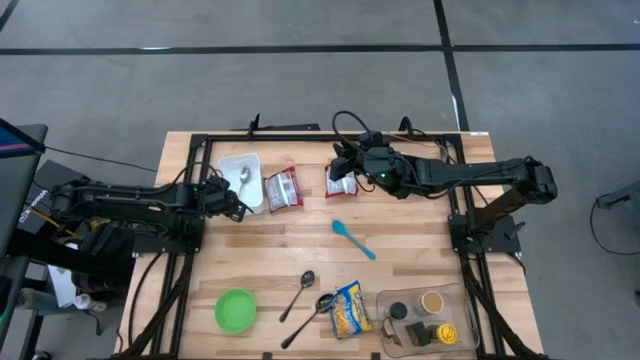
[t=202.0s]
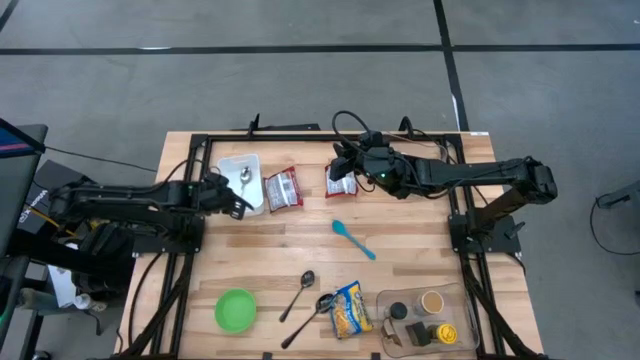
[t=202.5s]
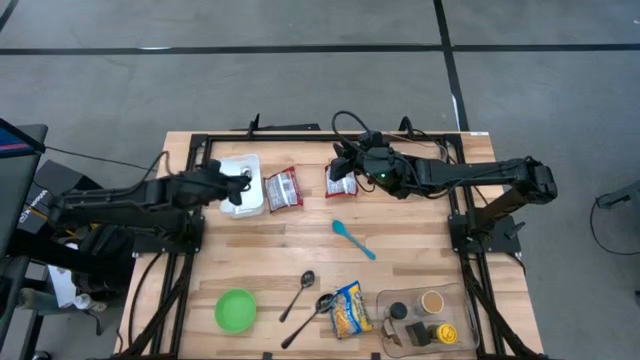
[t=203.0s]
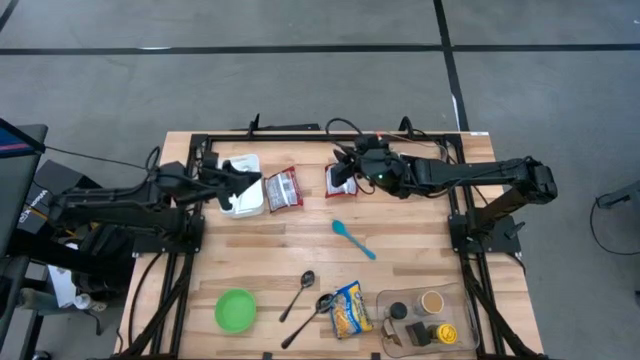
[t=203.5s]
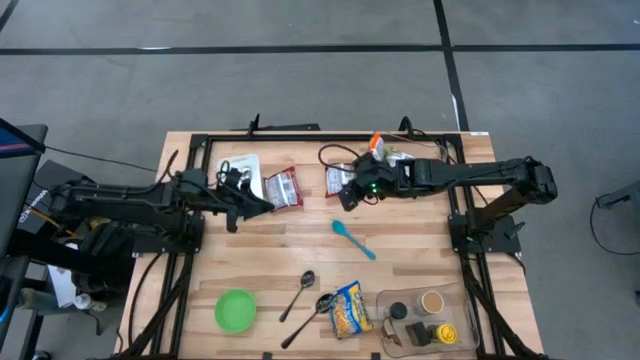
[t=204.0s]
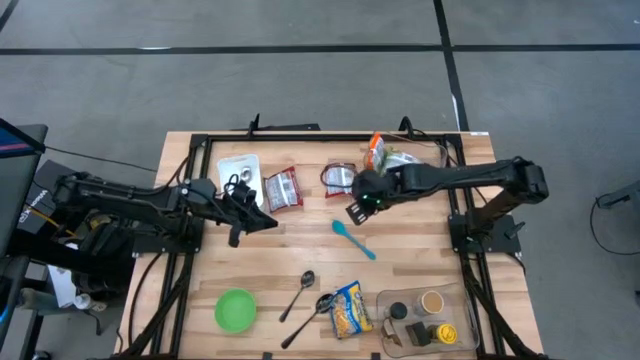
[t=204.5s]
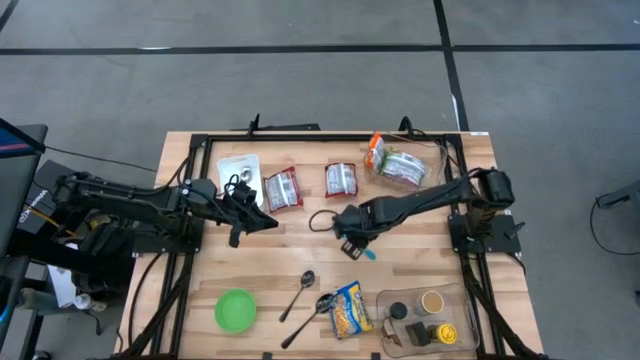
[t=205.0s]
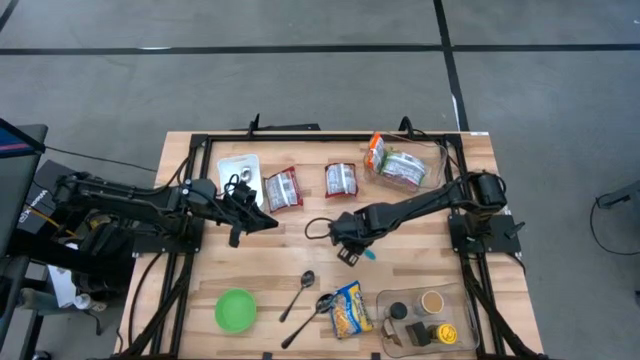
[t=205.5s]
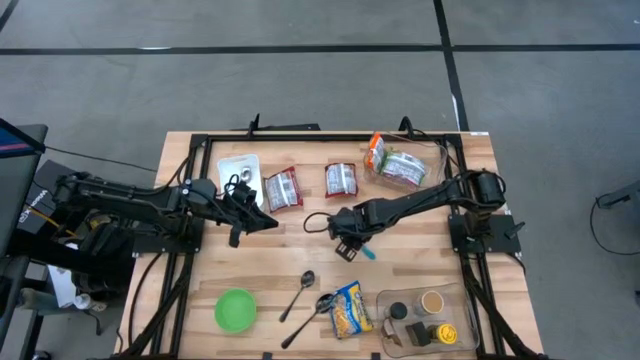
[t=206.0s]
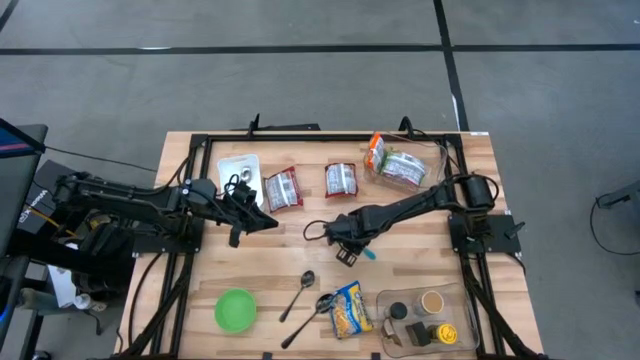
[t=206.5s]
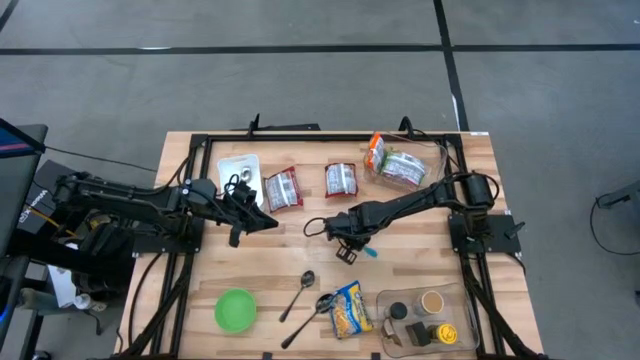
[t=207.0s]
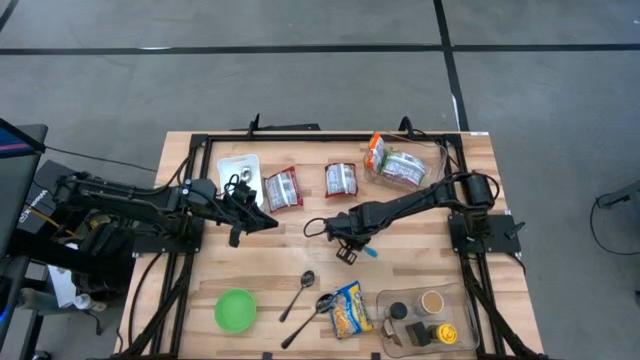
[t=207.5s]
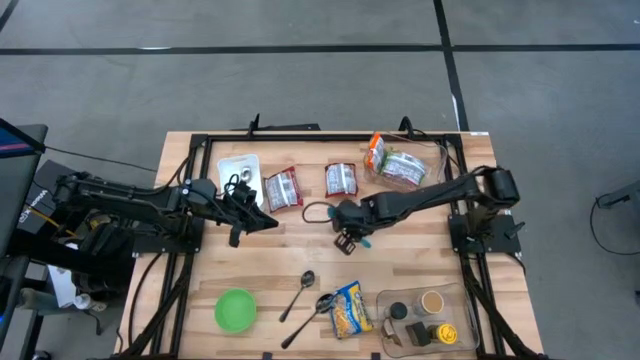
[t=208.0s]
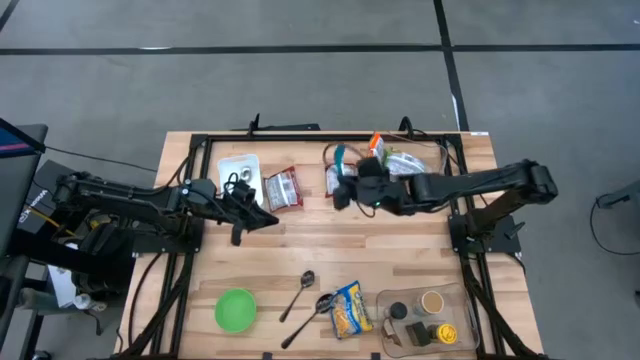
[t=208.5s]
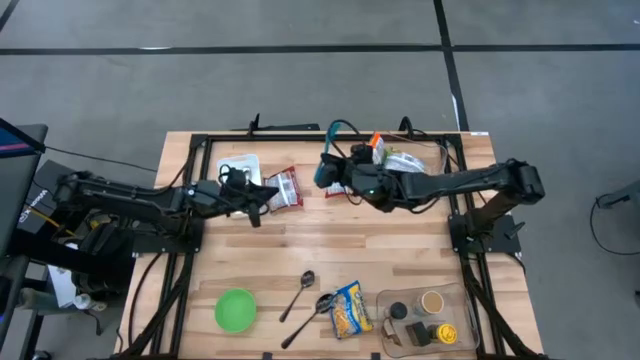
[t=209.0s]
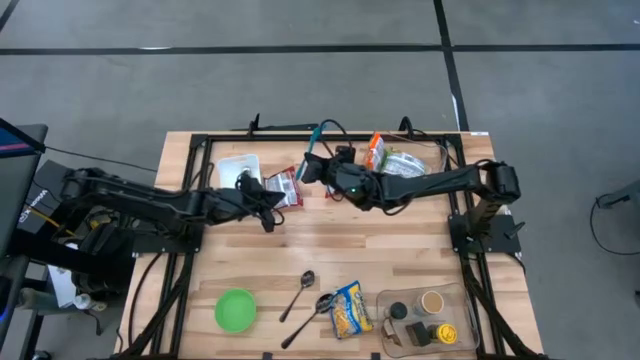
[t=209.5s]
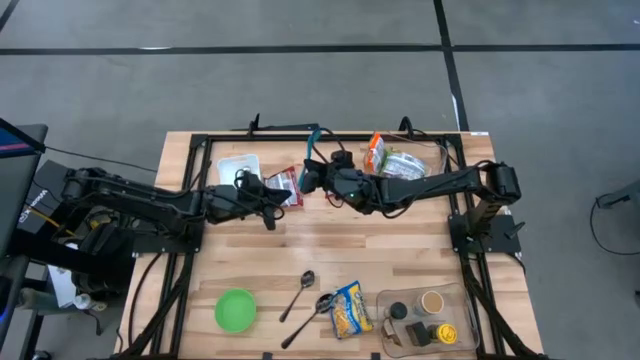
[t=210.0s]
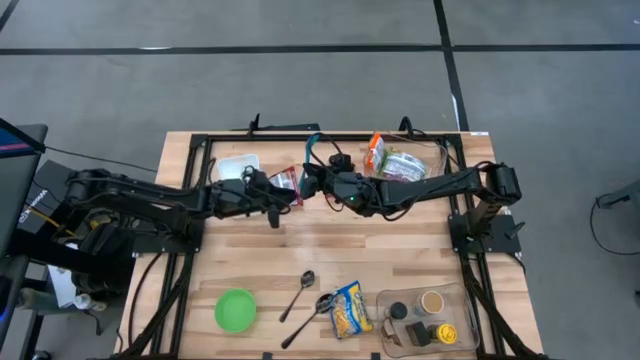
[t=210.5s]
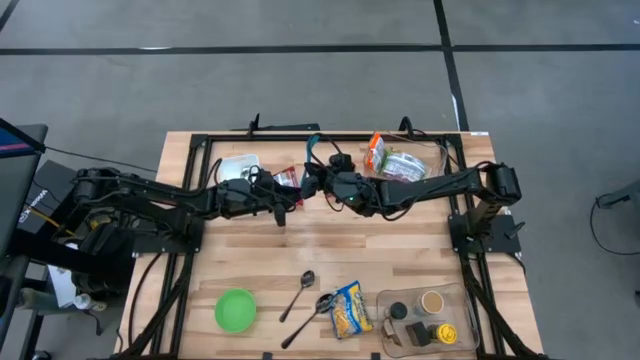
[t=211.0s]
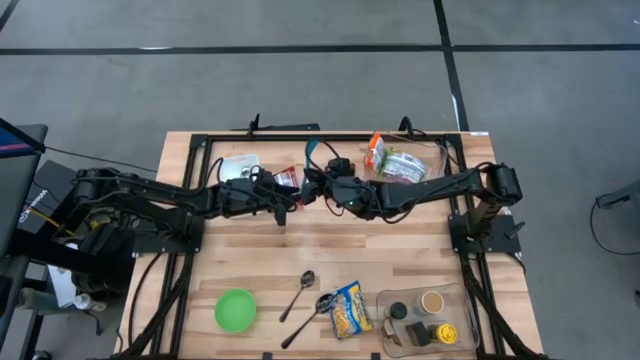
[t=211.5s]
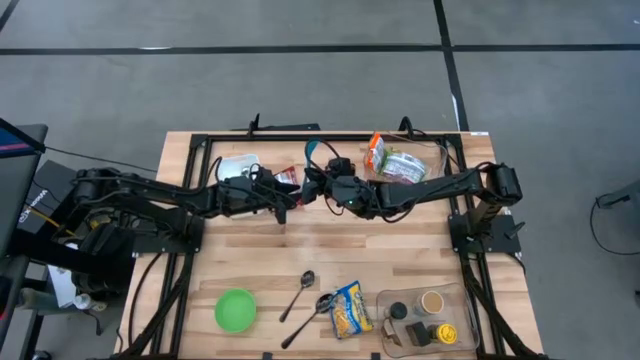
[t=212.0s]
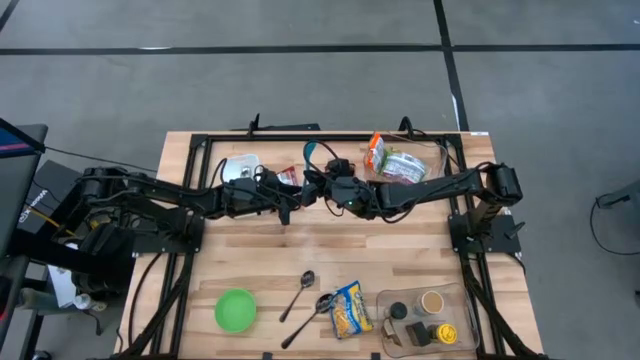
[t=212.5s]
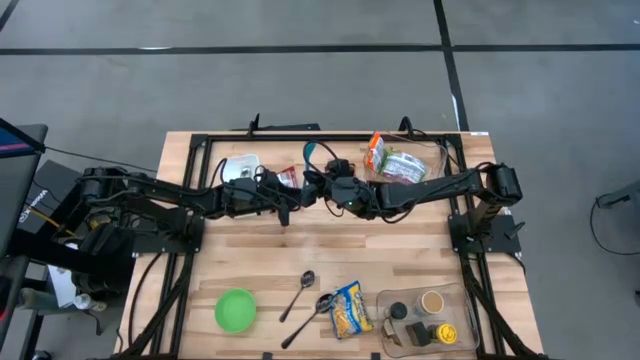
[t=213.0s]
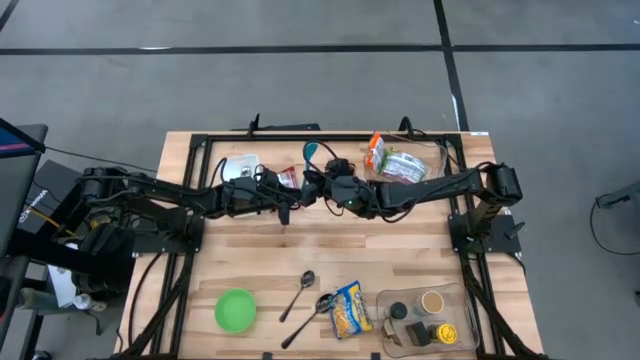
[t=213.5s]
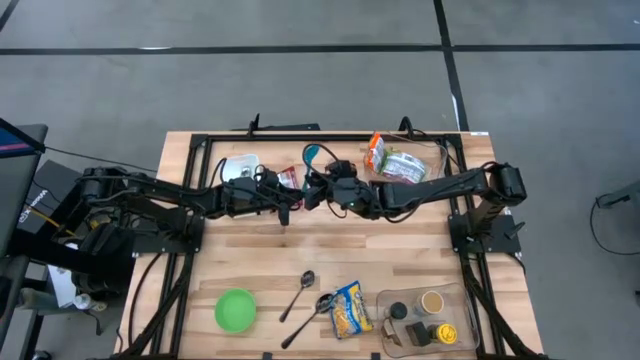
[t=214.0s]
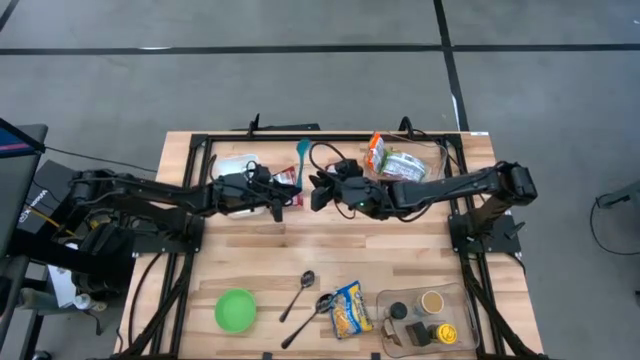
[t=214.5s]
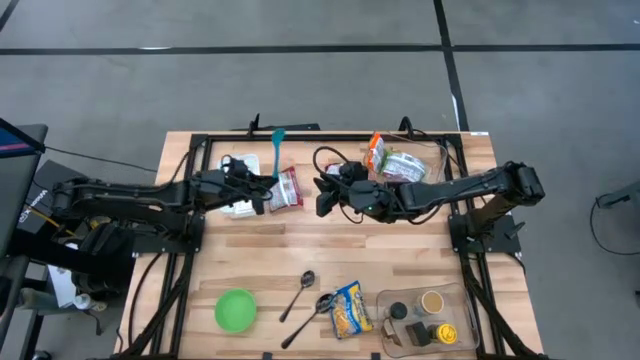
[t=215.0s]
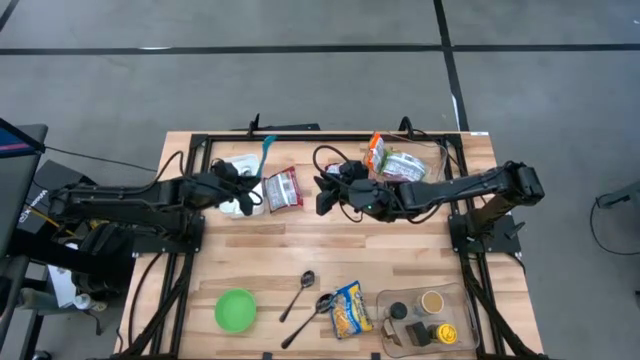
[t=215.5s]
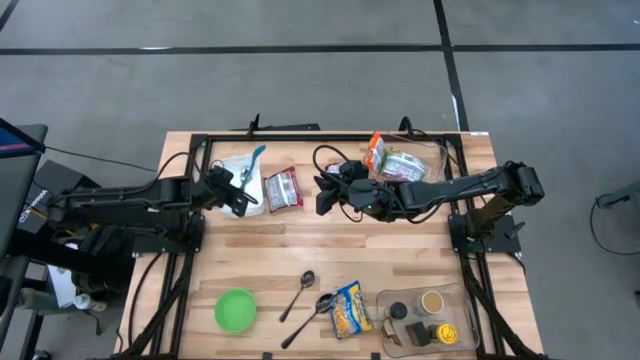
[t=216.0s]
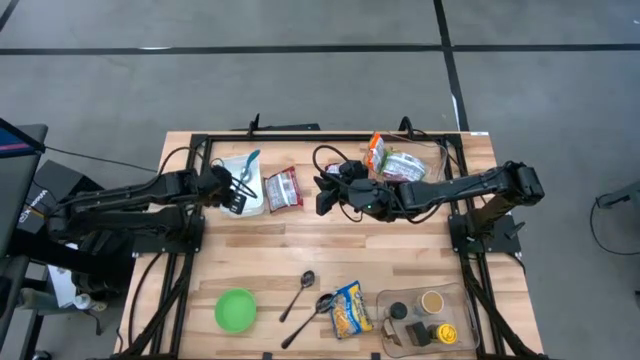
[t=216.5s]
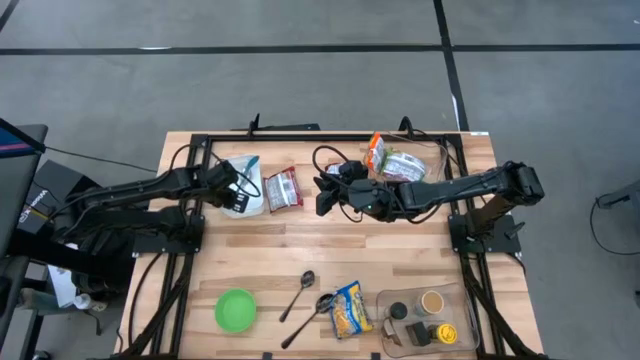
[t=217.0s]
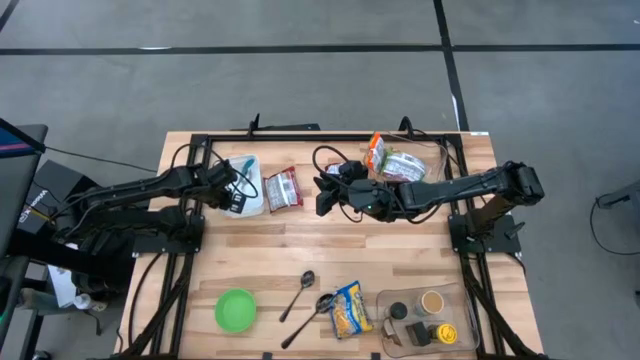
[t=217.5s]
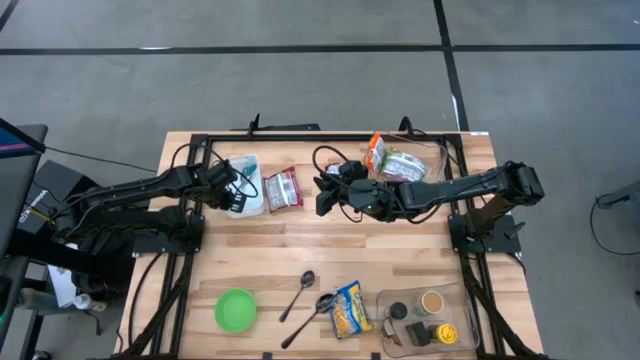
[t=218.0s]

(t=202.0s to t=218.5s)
Task: Pick & Place Food Item
Put the baby spoon into the white bin

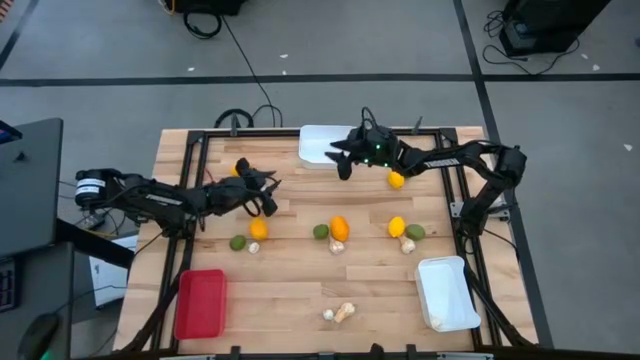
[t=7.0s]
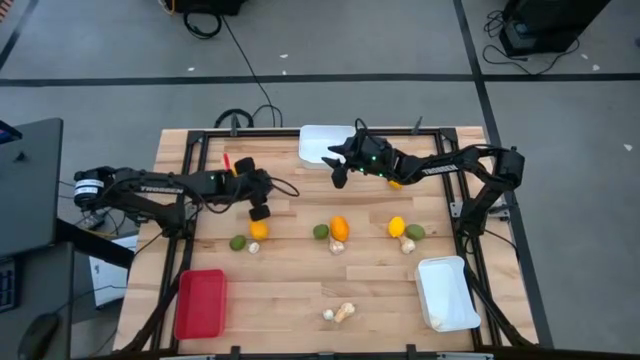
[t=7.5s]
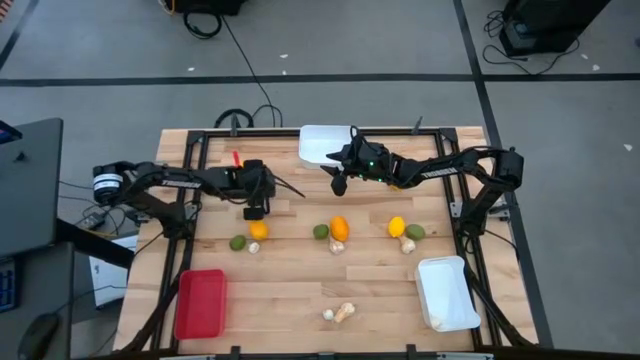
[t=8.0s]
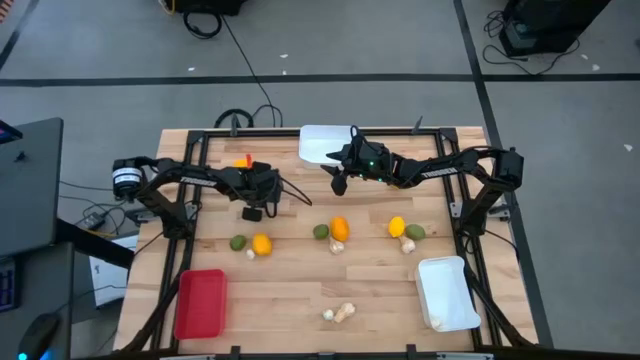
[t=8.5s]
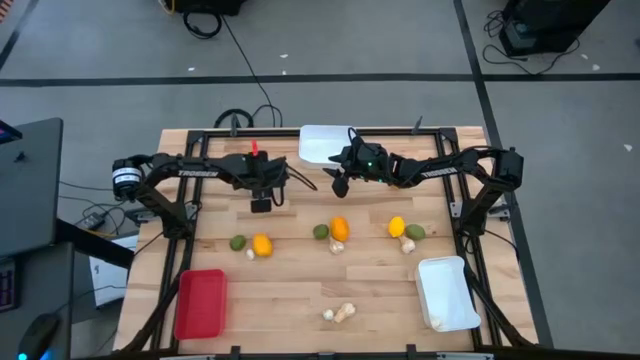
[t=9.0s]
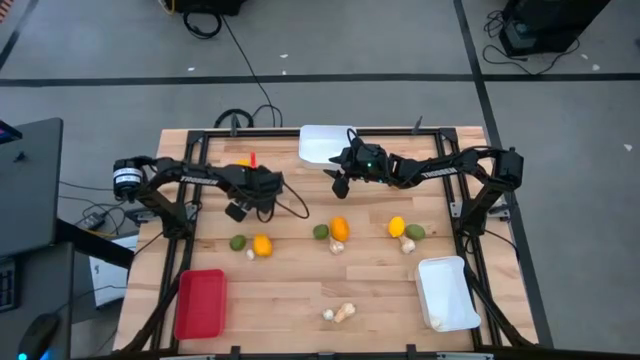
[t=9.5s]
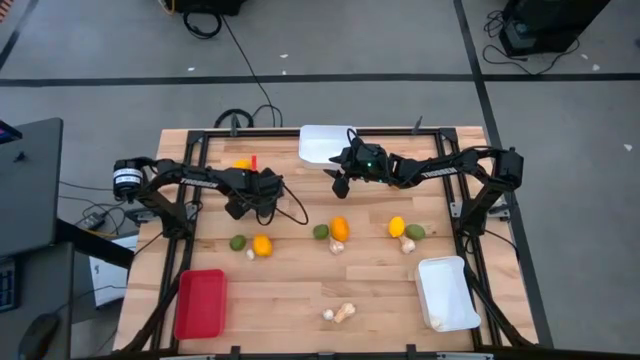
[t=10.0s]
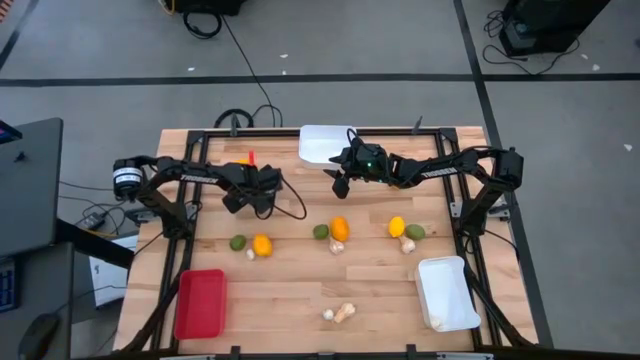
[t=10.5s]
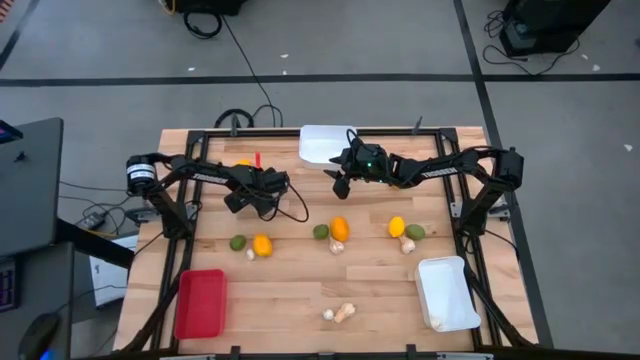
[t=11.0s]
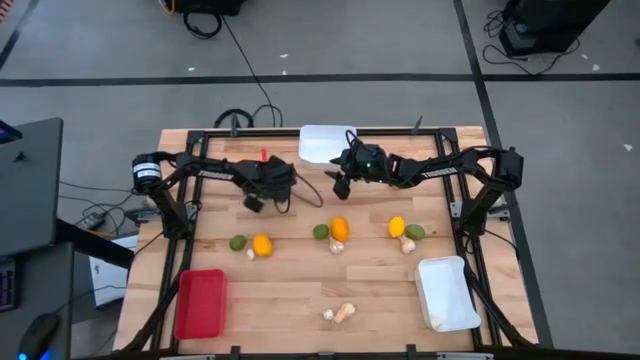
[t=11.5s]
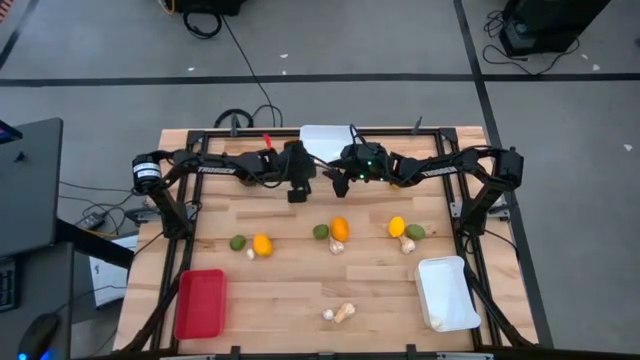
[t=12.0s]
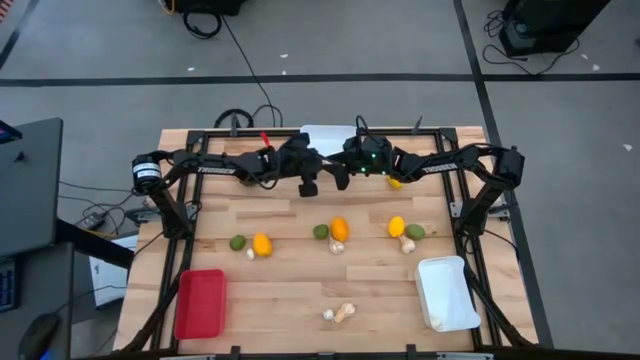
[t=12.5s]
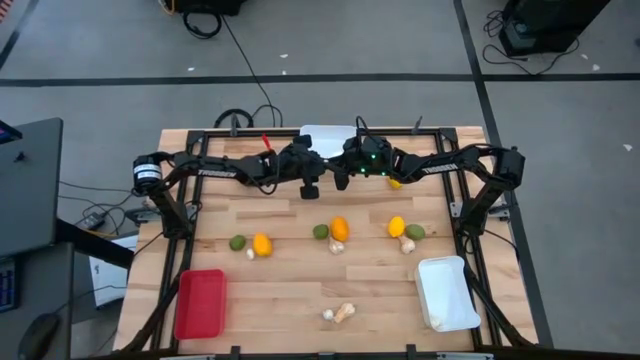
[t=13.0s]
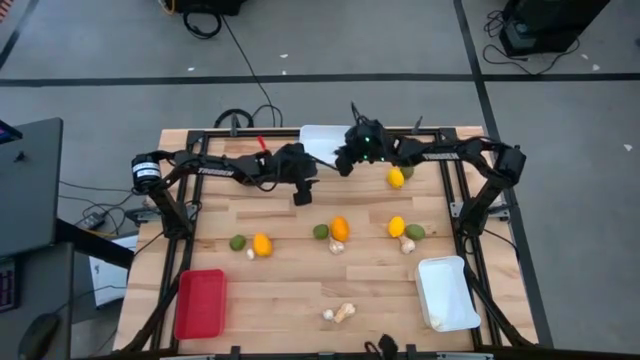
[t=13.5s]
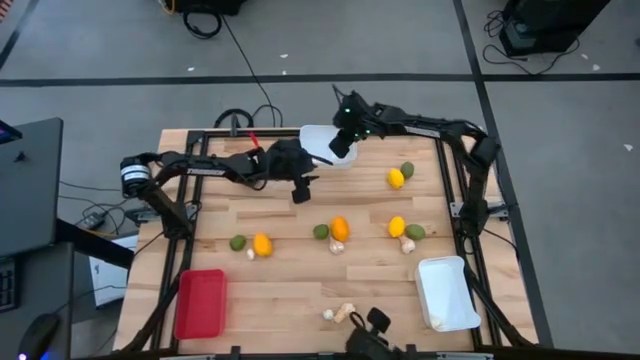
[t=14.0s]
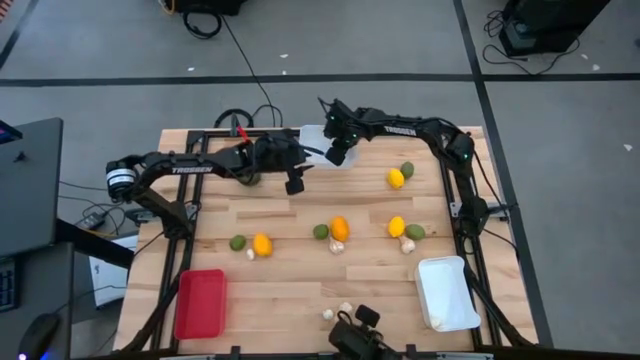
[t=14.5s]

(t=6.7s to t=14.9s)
Task: Sort produce into baskets
Put the garlic into the top white bin
